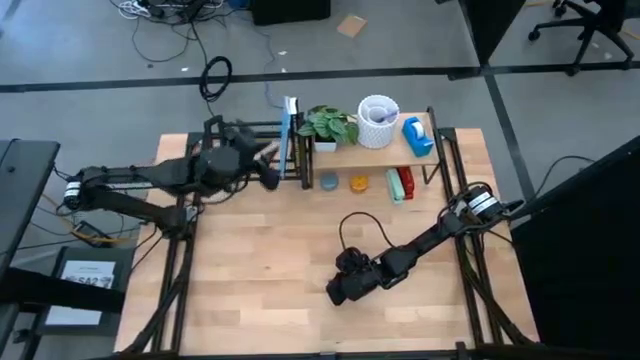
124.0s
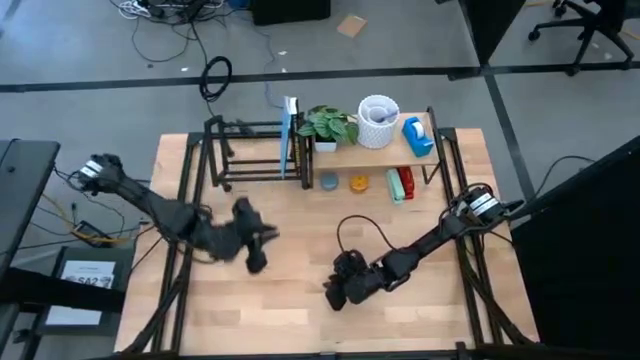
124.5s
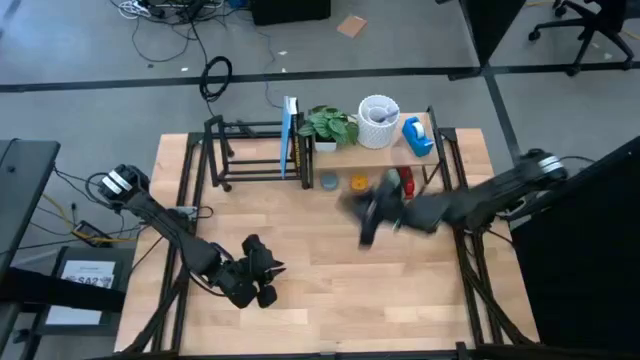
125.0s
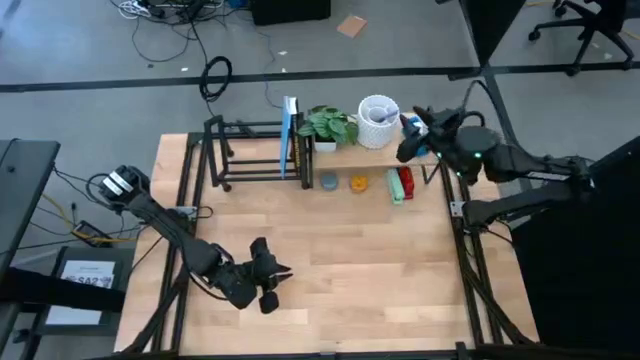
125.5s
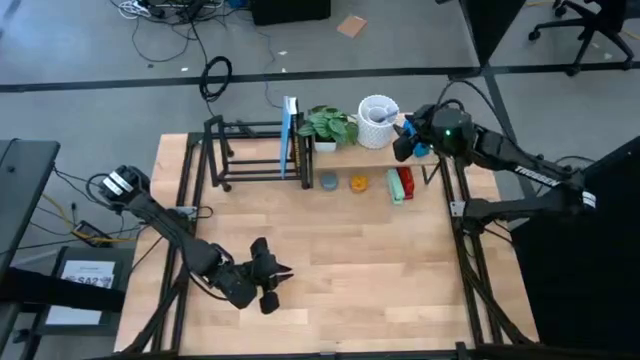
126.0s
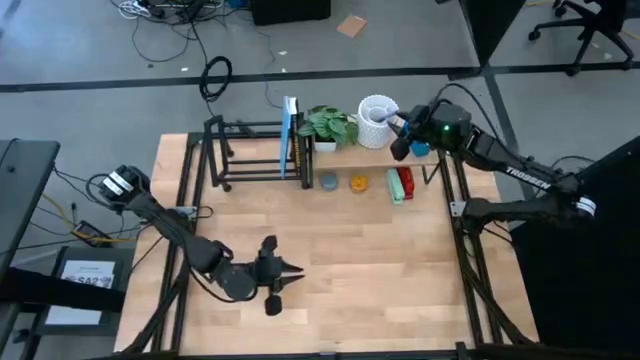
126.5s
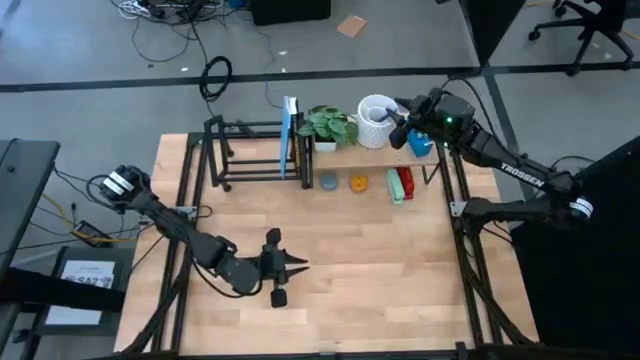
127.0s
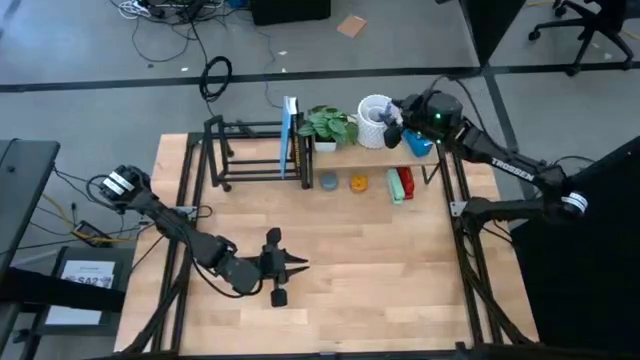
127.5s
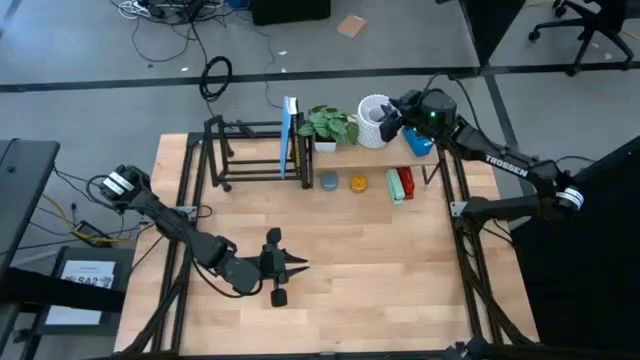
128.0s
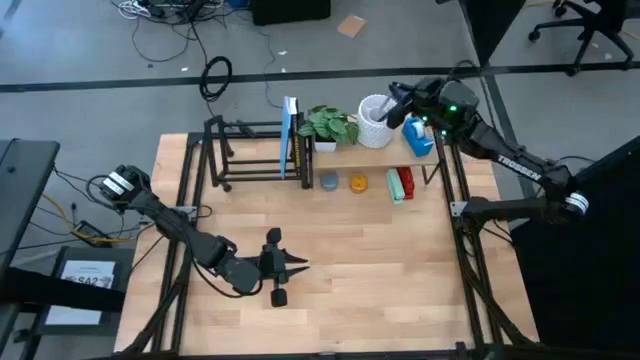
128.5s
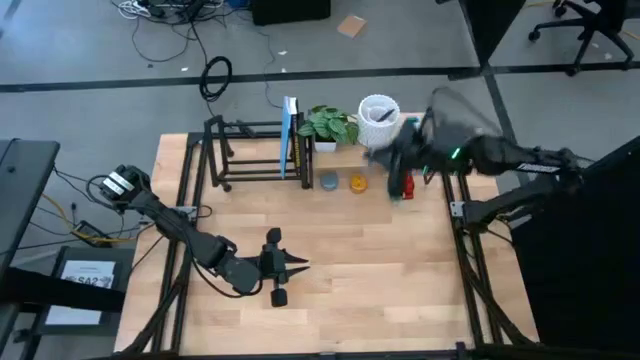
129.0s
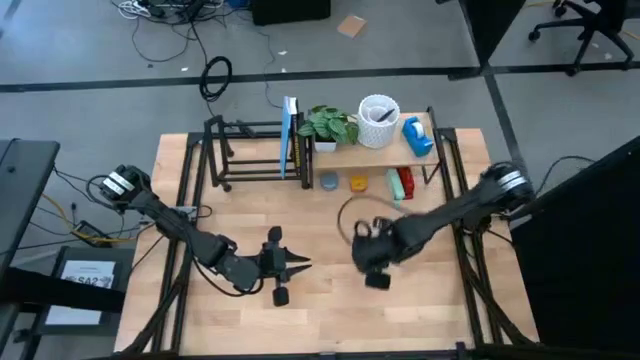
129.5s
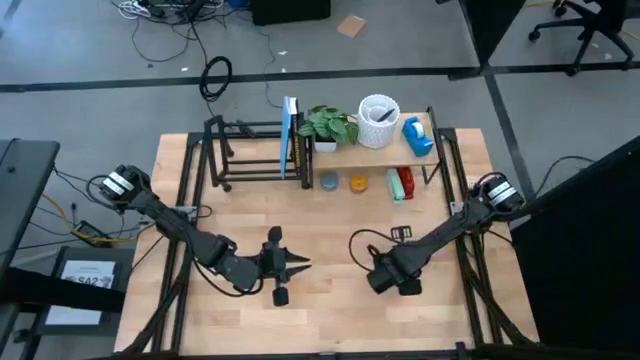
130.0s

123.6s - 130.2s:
Task: Stock shelves
Remove the purple pen from the white pen organizer on the shelf

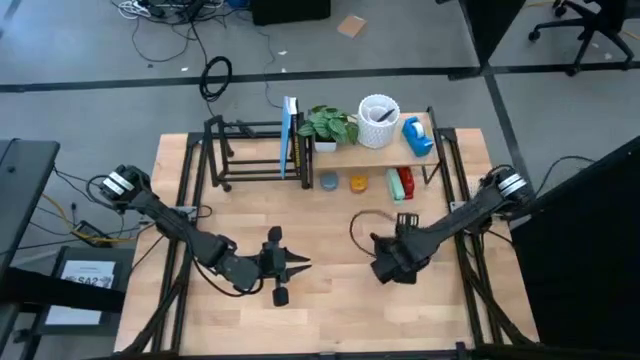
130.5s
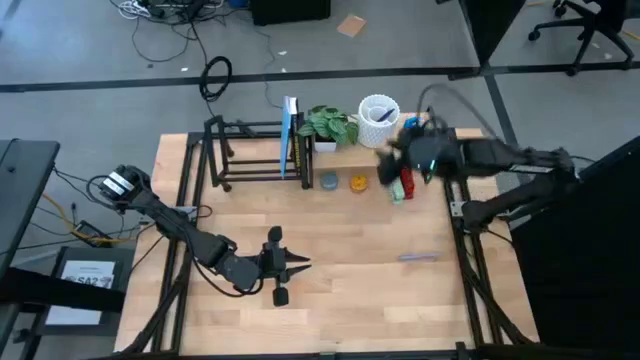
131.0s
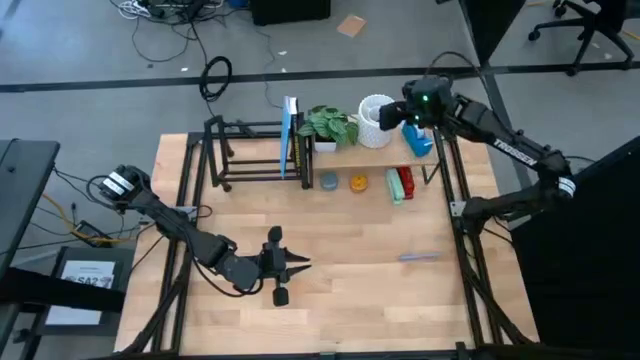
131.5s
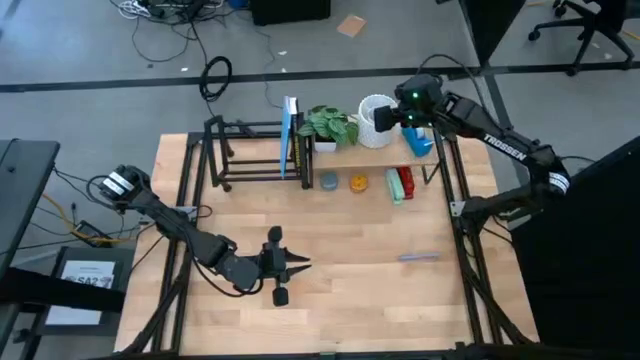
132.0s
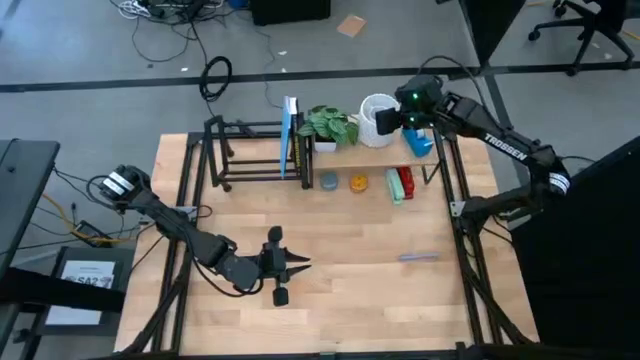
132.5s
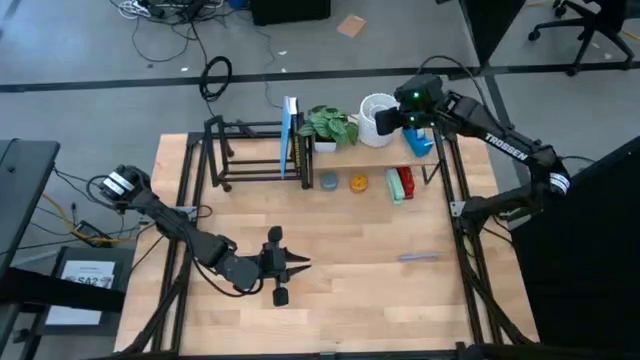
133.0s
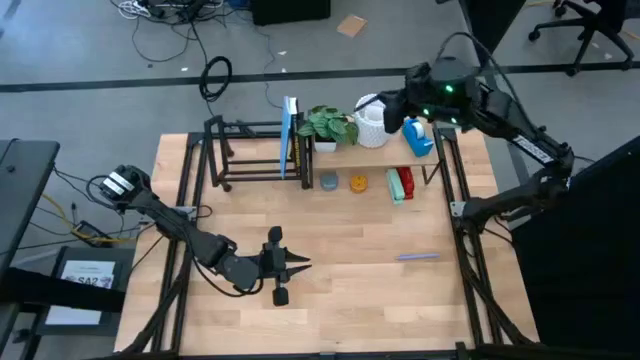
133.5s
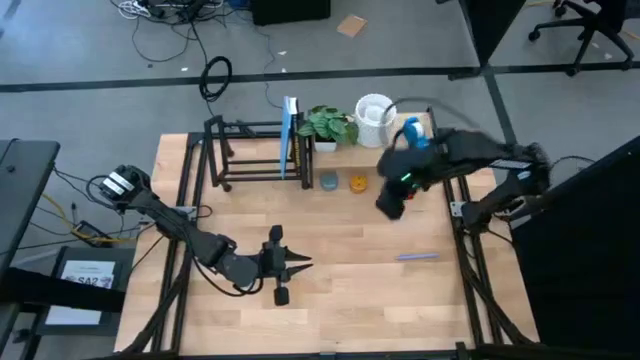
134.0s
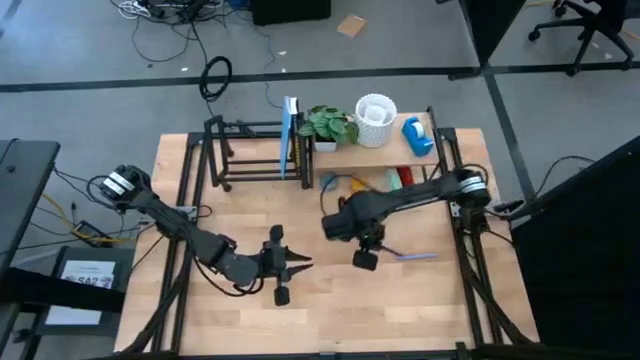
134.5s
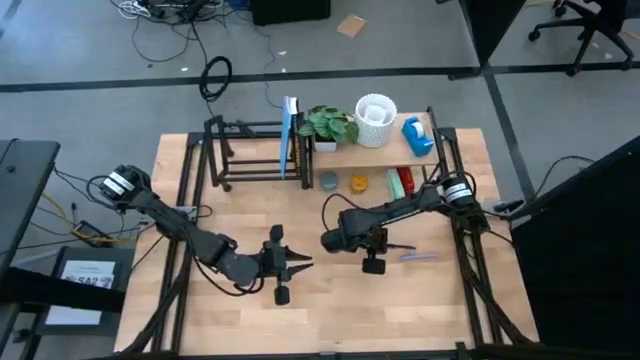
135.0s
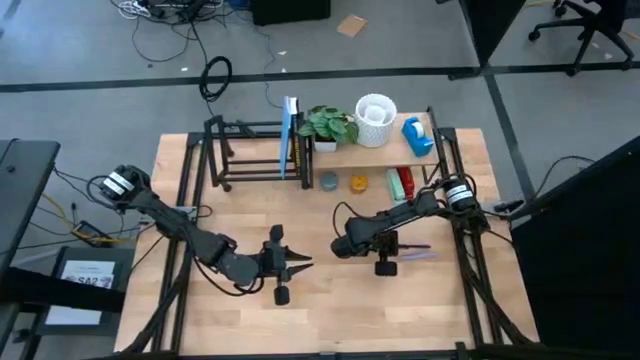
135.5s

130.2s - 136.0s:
Remove the blue pen from the white pen organizer on the shelf

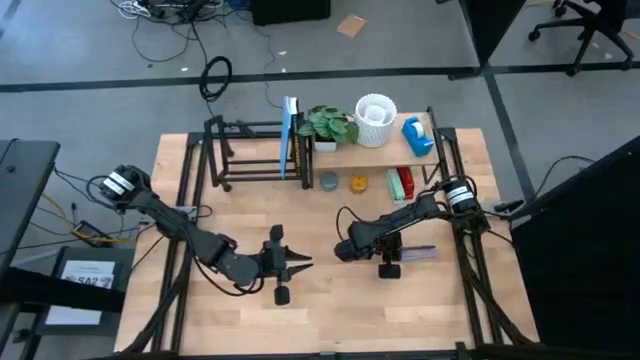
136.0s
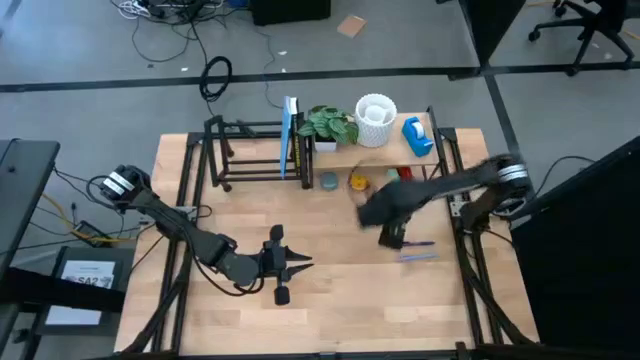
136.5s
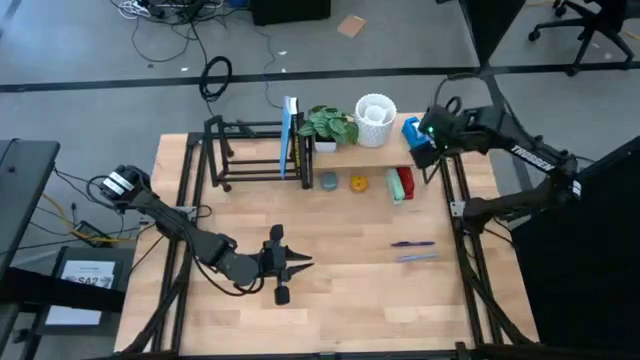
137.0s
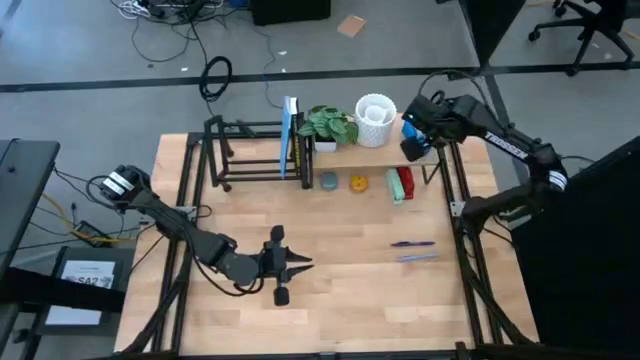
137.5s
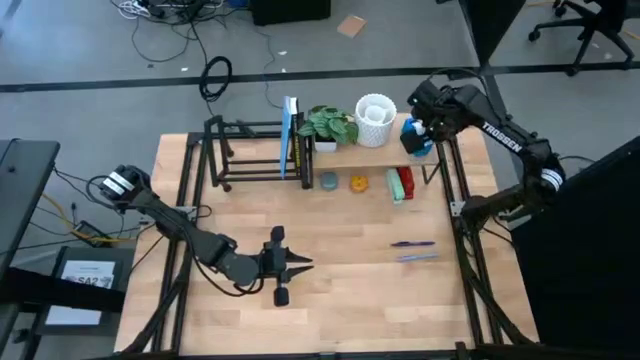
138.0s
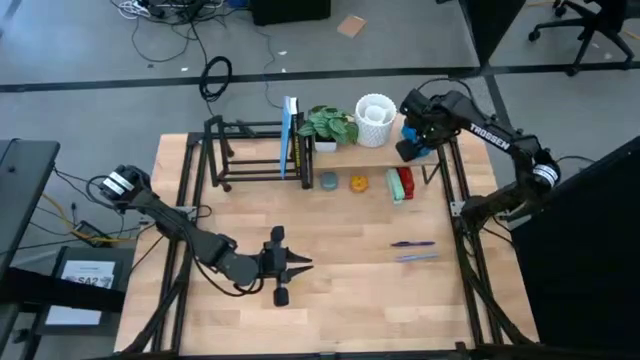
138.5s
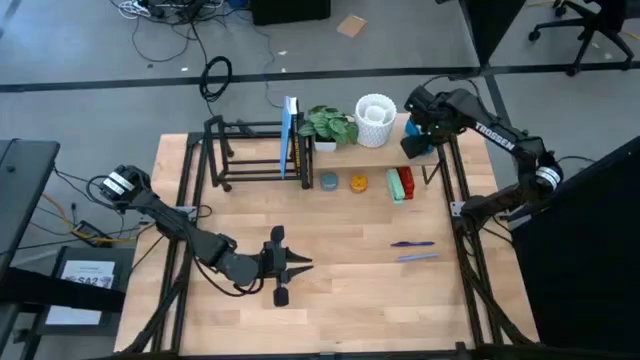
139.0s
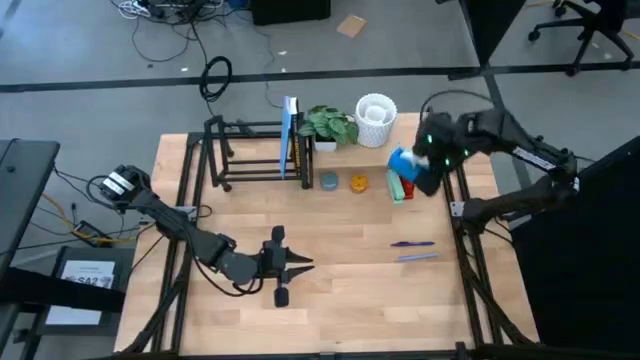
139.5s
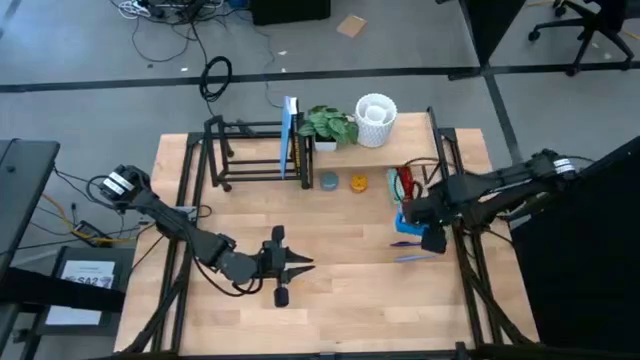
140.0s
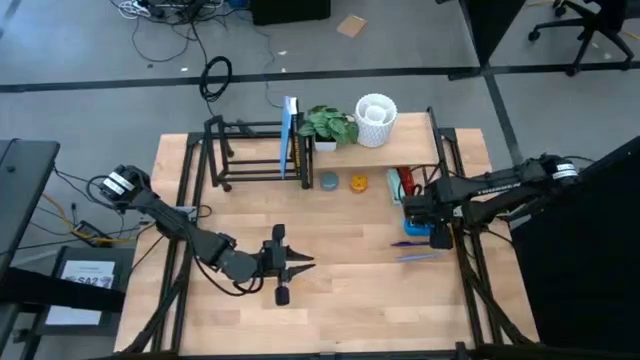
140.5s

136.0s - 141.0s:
Remove the blue tape dispenser from the shelf

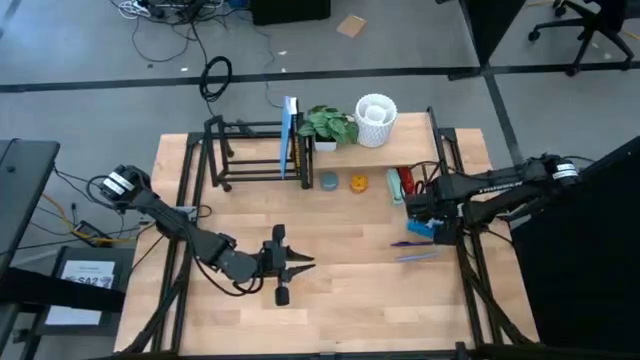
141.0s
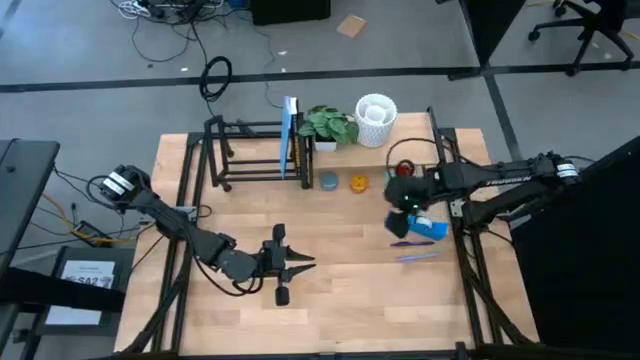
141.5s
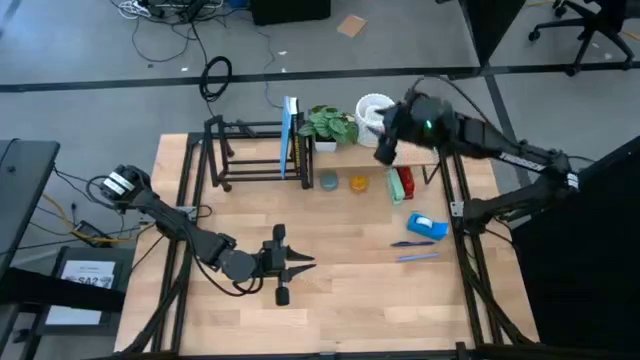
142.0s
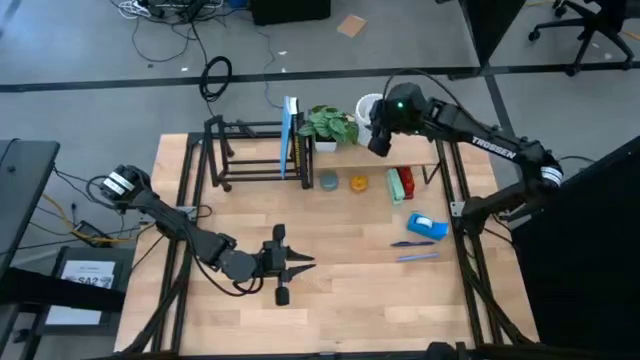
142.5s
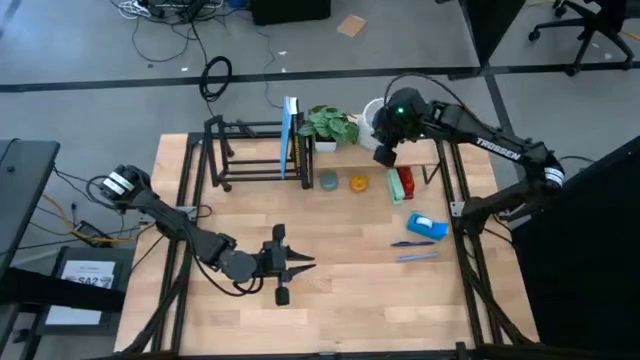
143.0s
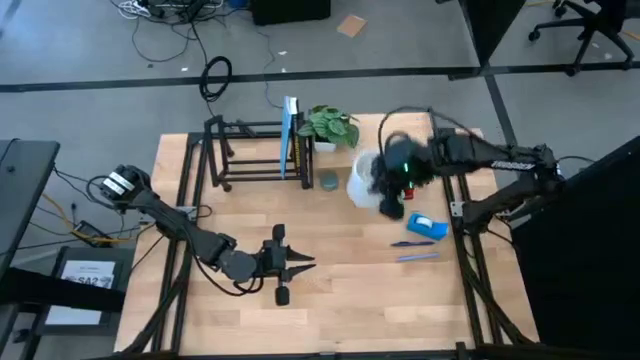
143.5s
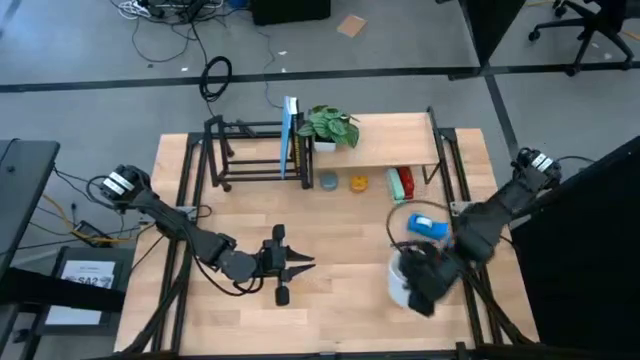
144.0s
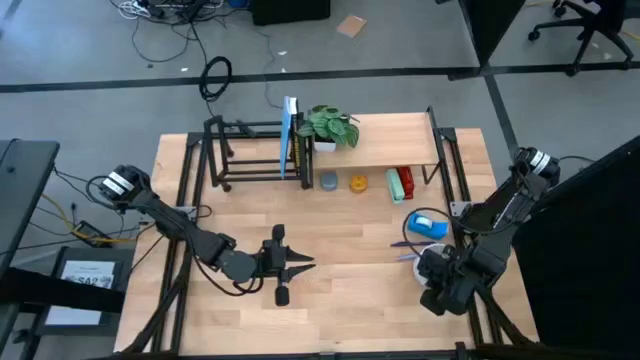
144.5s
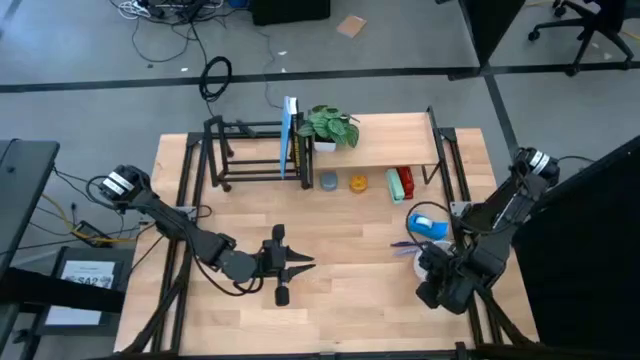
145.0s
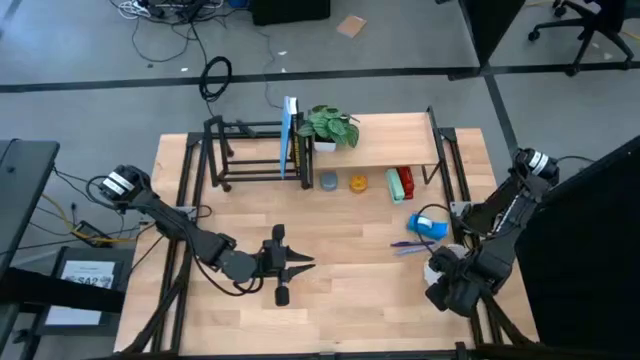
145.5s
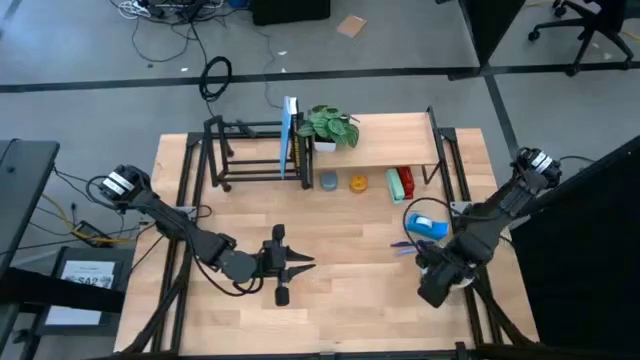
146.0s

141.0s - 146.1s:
Remove the white pen organizer from the shelf
